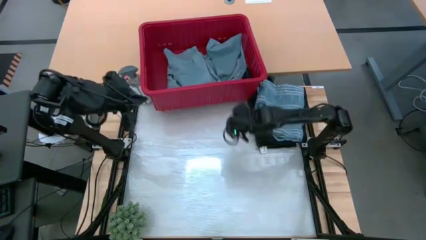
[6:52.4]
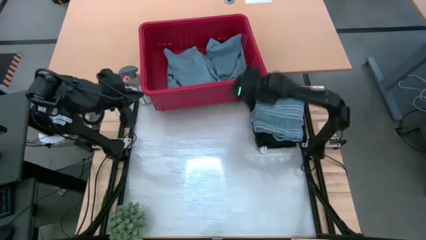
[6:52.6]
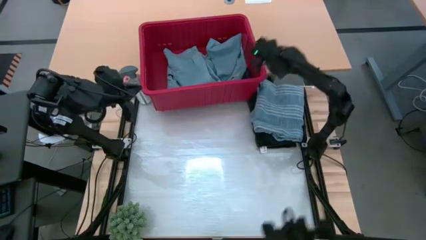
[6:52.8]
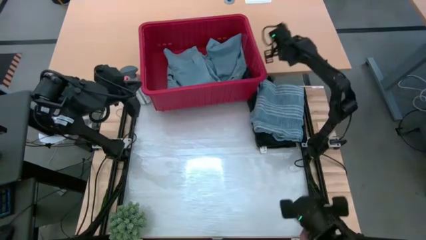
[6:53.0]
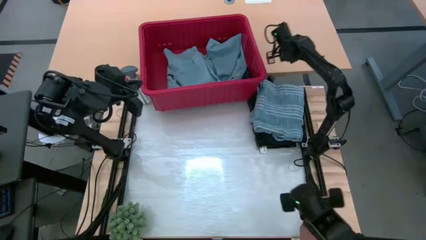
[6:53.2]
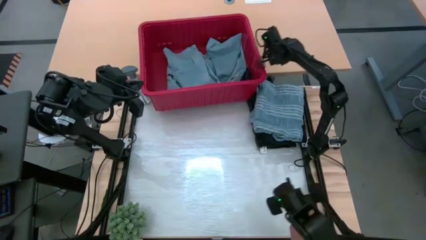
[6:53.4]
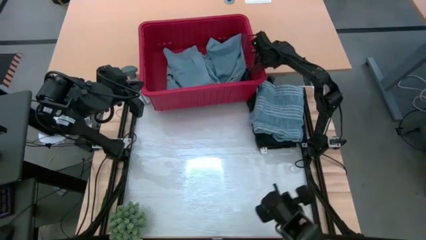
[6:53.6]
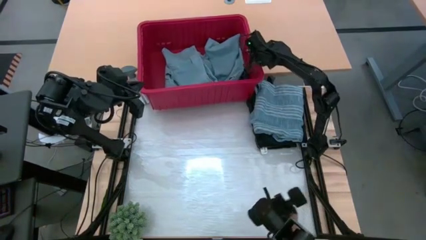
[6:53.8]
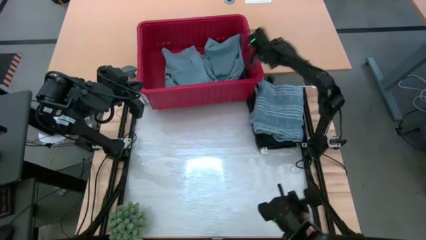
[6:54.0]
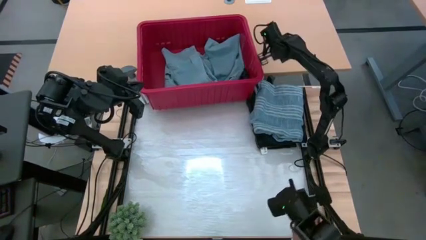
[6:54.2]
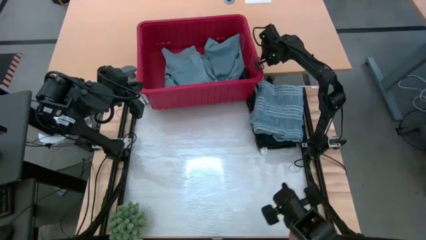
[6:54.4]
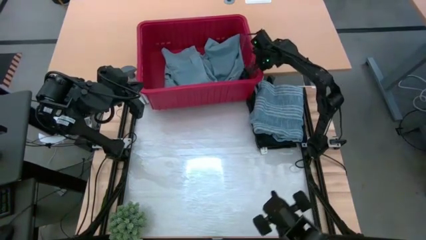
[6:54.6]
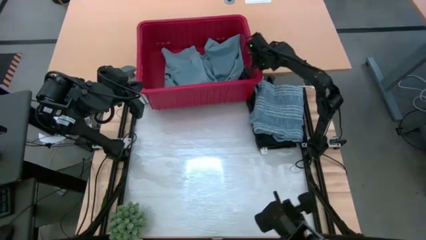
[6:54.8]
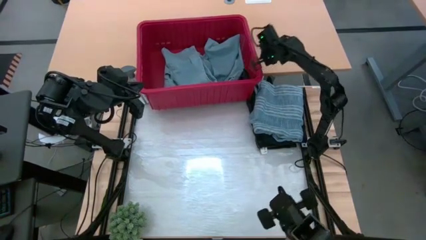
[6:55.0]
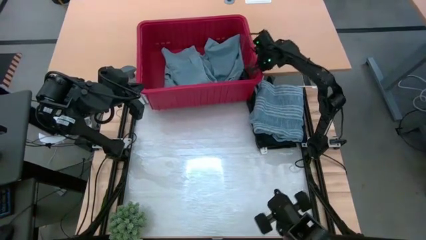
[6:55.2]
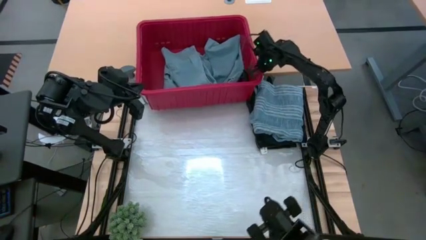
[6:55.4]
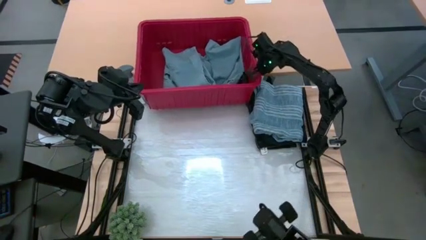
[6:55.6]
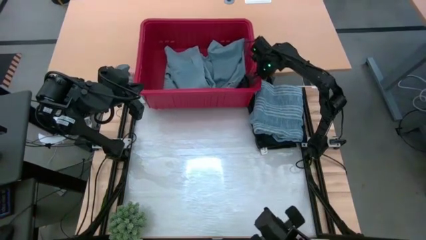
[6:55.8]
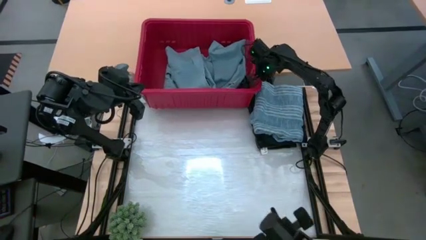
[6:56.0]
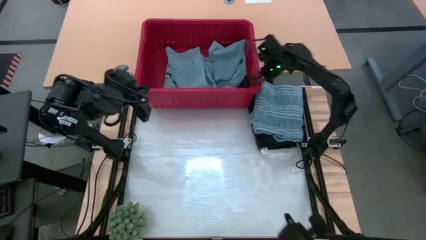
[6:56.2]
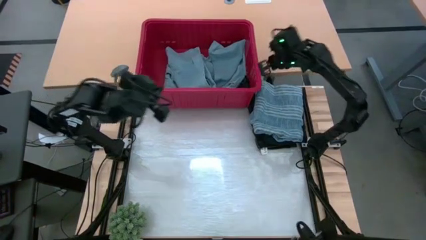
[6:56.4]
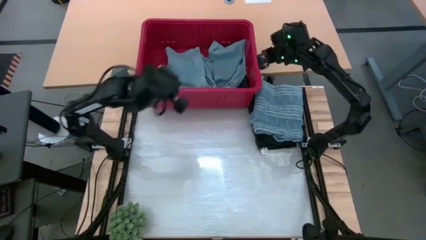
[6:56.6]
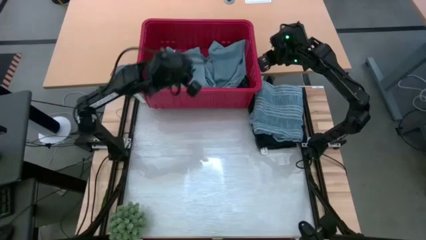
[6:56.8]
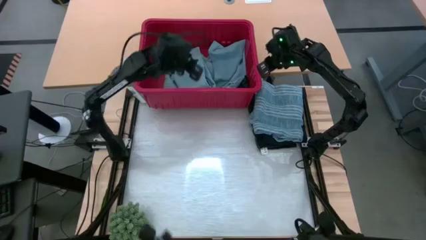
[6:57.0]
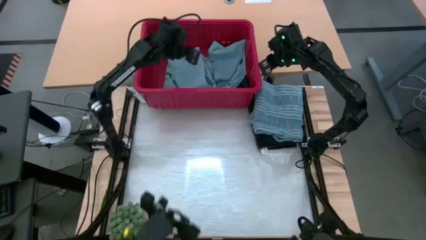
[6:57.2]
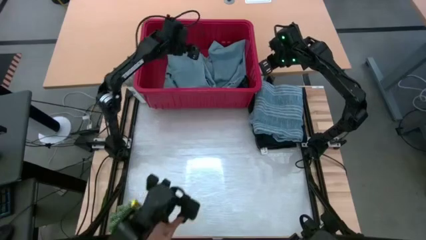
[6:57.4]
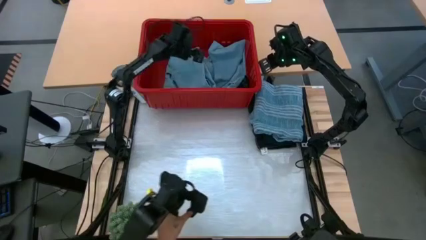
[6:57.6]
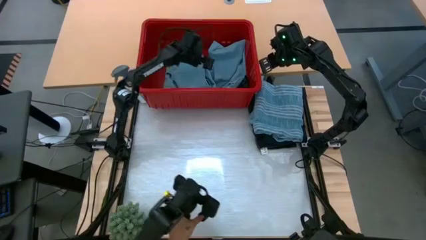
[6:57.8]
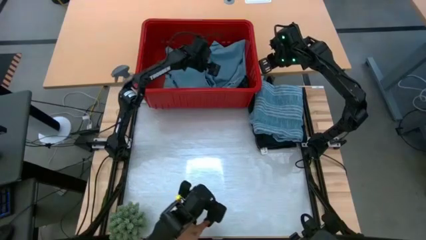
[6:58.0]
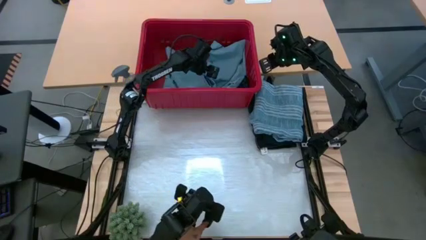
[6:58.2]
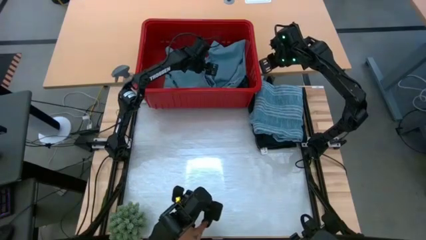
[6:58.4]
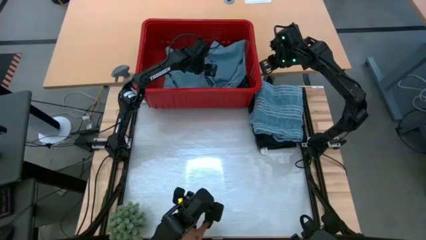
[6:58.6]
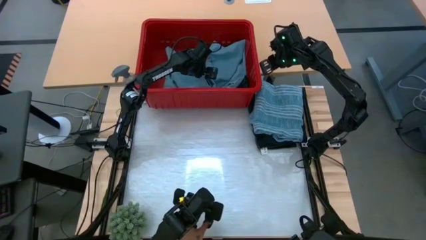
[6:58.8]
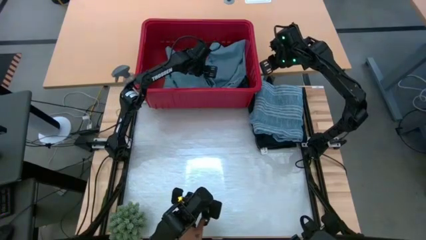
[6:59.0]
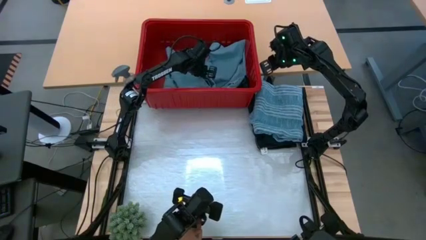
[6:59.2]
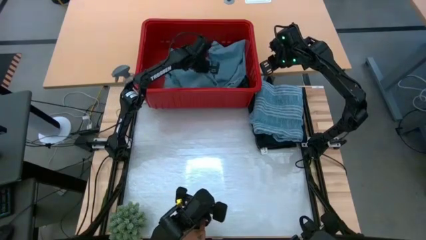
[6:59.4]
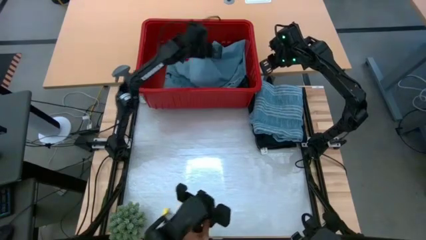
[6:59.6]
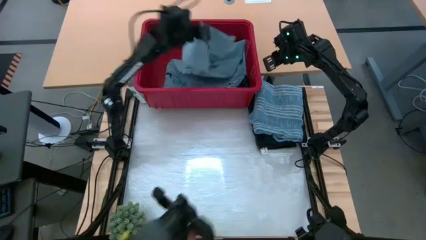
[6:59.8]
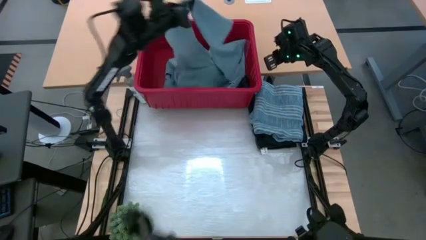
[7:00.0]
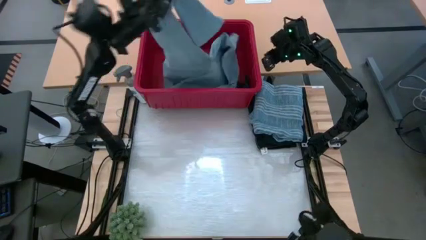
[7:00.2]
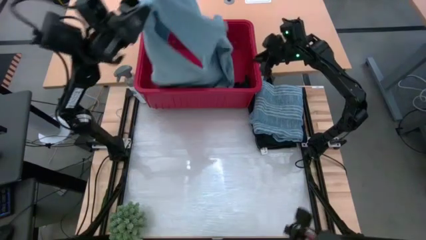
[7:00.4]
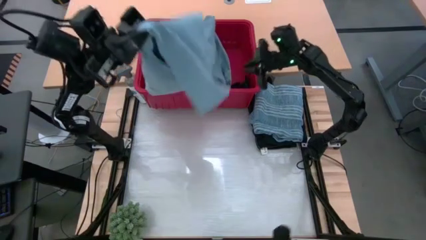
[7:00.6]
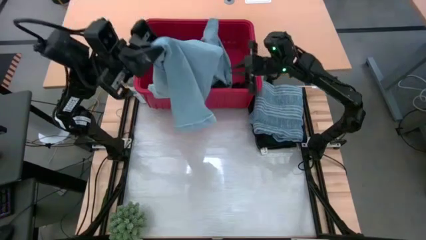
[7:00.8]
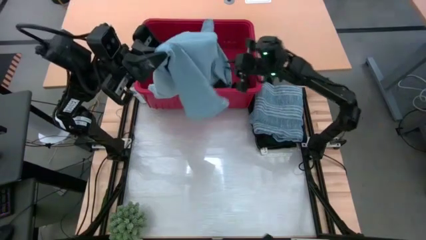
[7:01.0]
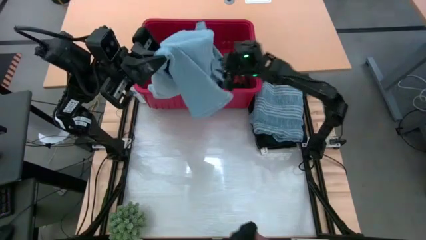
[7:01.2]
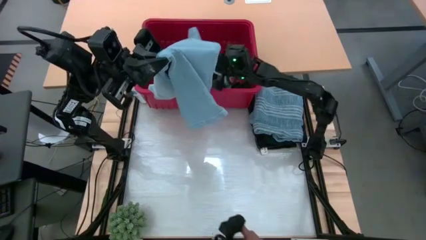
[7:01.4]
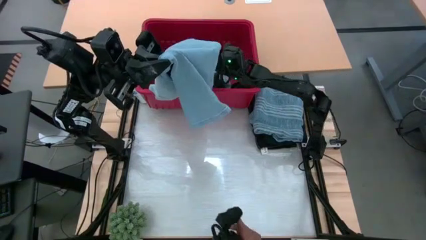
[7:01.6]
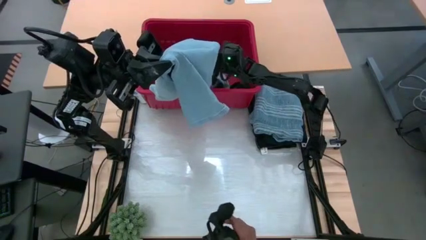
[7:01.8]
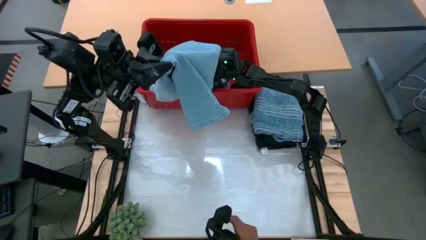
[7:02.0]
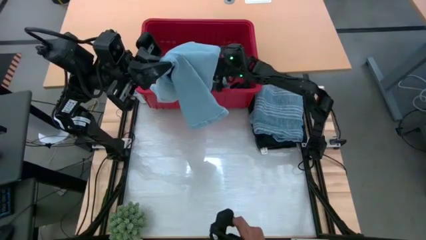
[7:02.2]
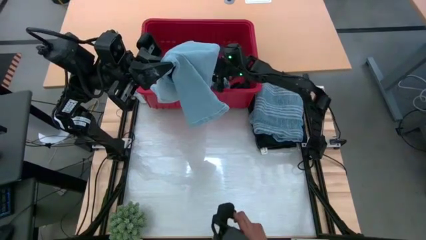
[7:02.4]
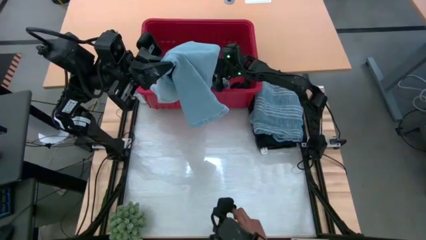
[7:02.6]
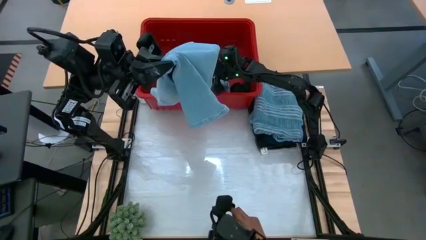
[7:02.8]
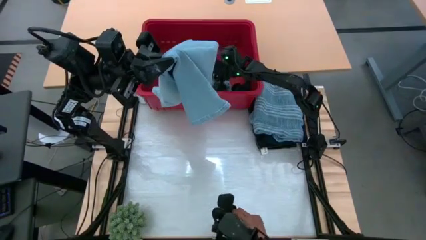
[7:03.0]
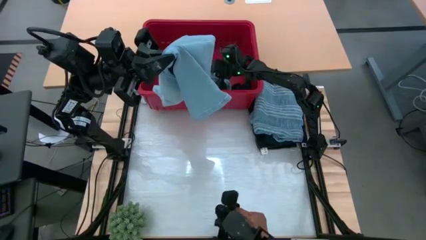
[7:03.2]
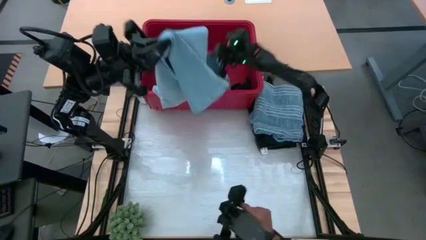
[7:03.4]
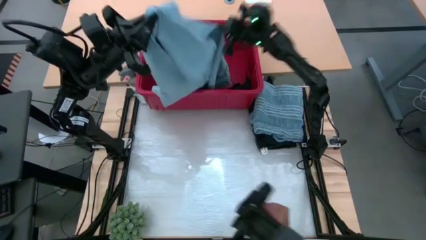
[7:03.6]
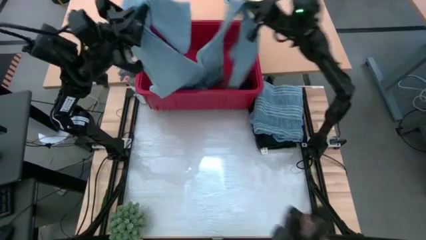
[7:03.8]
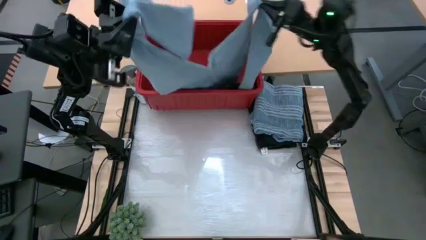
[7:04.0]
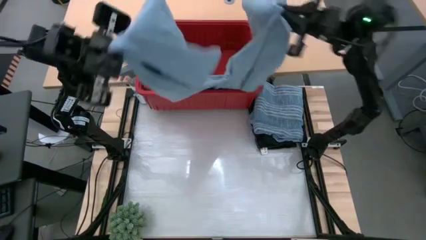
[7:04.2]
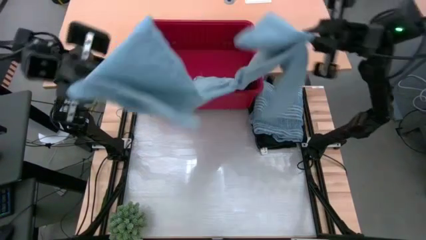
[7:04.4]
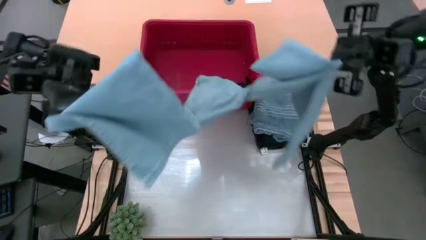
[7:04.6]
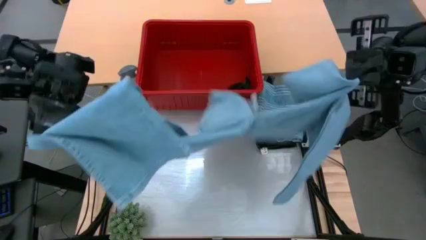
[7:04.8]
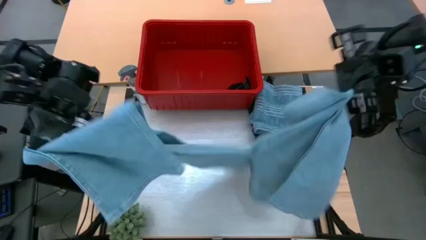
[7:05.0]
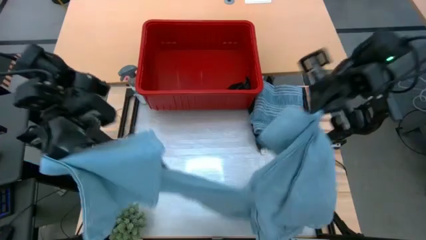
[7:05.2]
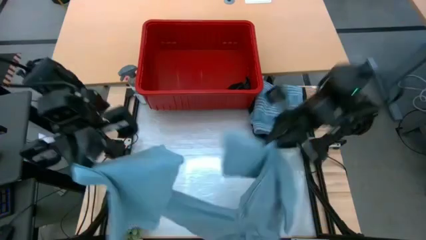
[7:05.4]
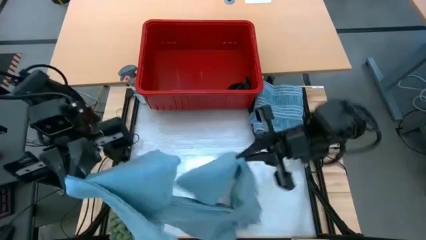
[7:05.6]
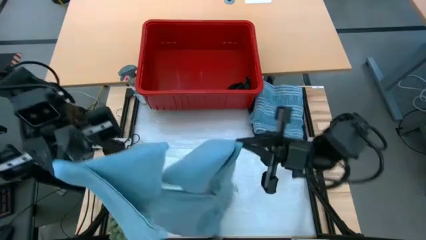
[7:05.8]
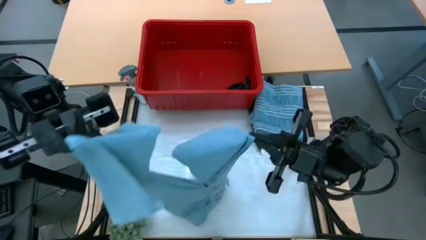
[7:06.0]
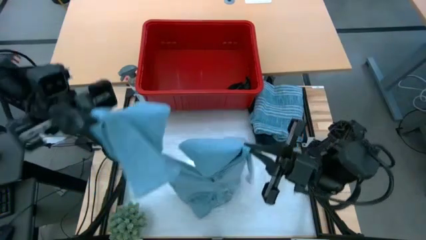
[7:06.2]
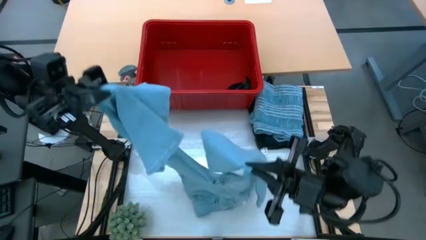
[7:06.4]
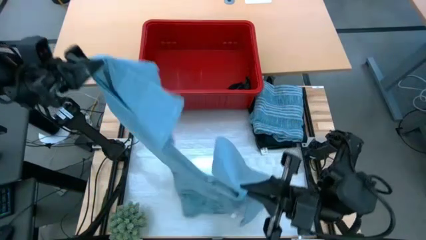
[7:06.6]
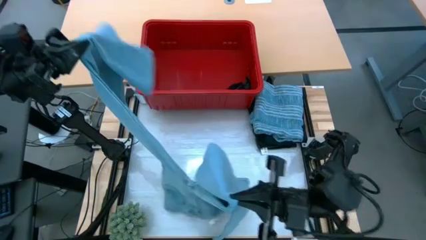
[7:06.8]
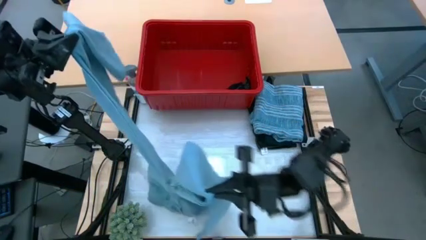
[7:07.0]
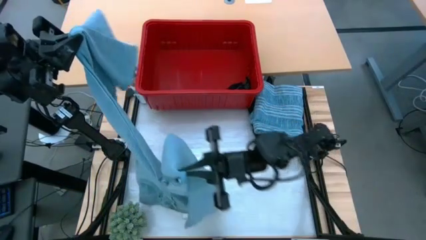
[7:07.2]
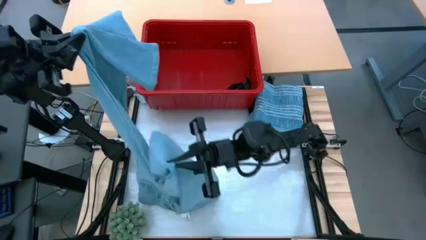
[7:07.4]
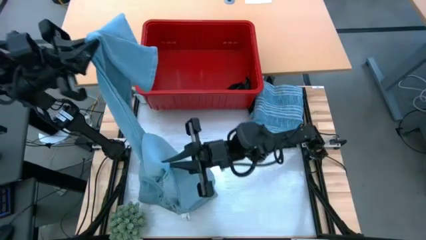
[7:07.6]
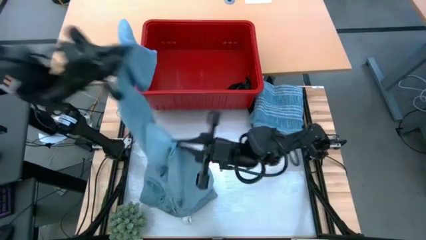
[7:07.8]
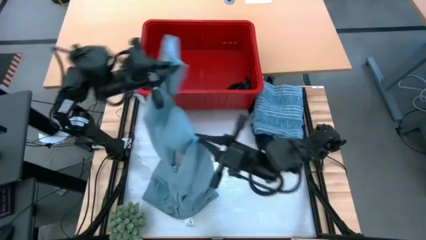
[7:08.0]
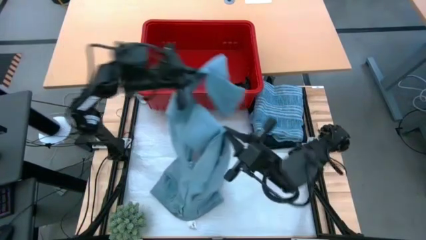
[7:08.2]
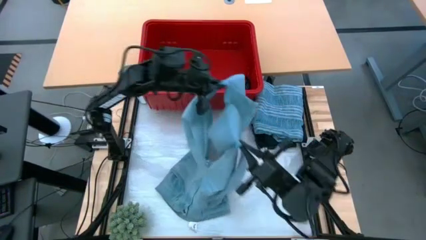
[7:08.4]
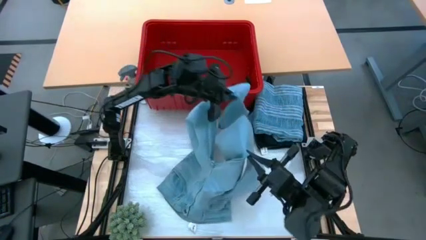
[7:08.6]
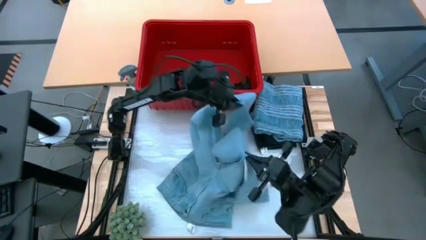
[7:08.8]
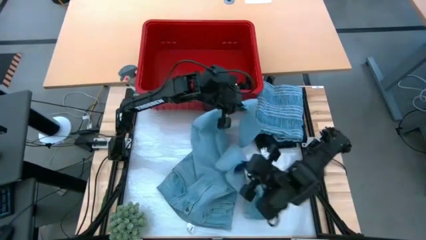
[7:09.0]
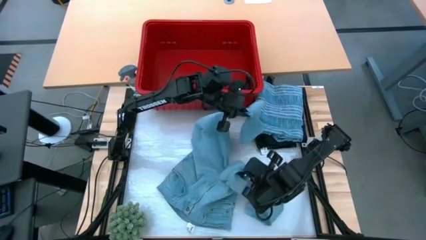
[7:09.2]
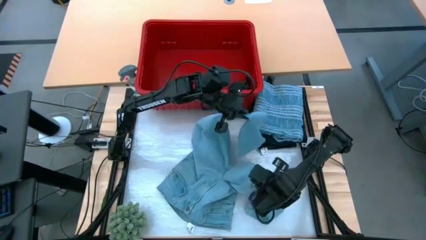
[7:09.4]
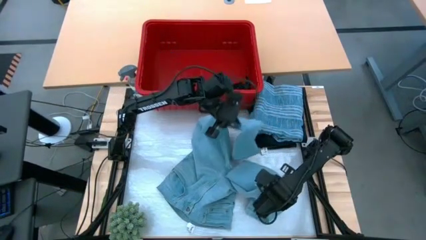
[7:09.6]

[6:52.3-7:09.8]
Task: Fold Laundry from Bin
Fold the light blue pants
